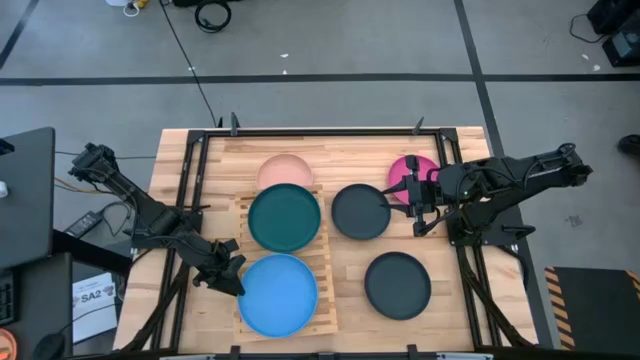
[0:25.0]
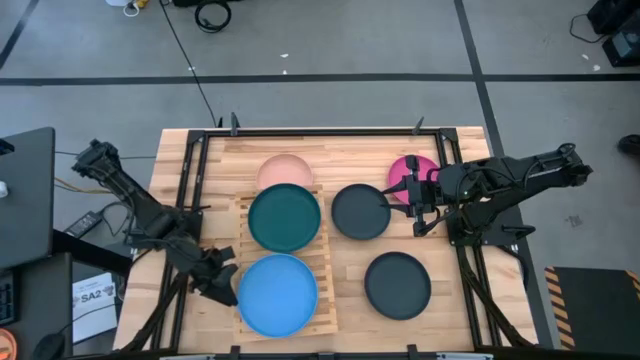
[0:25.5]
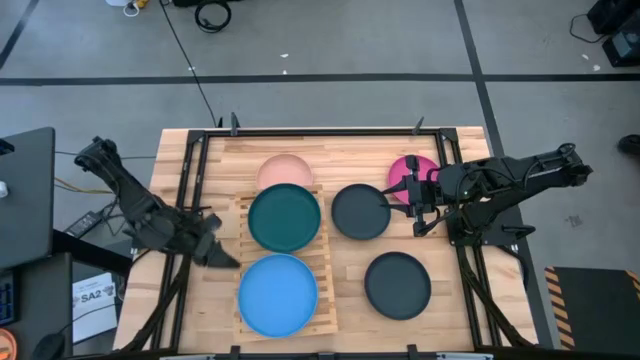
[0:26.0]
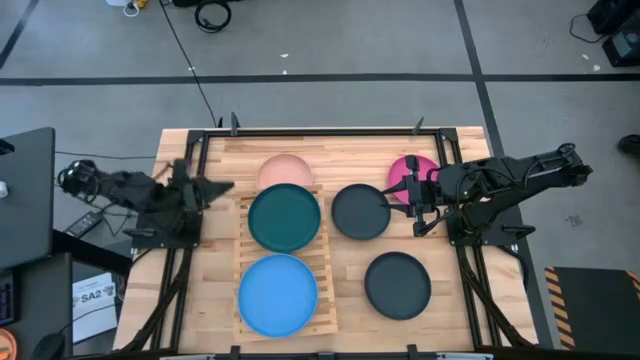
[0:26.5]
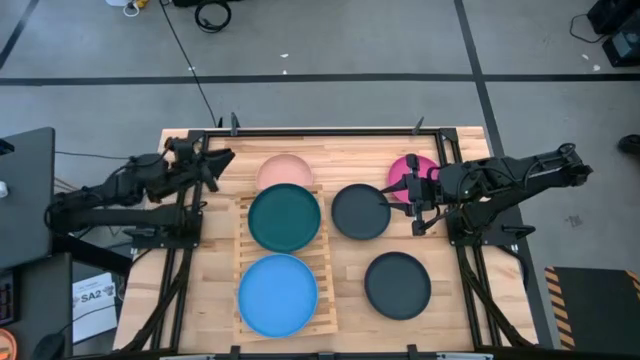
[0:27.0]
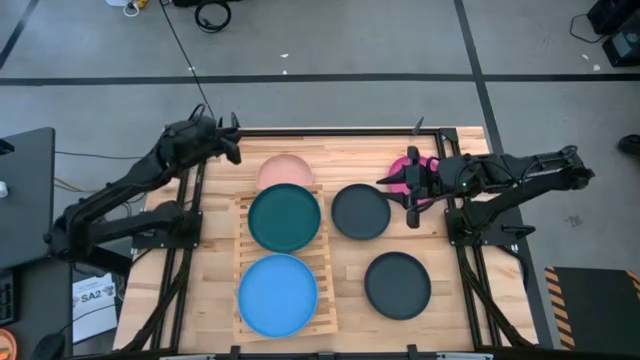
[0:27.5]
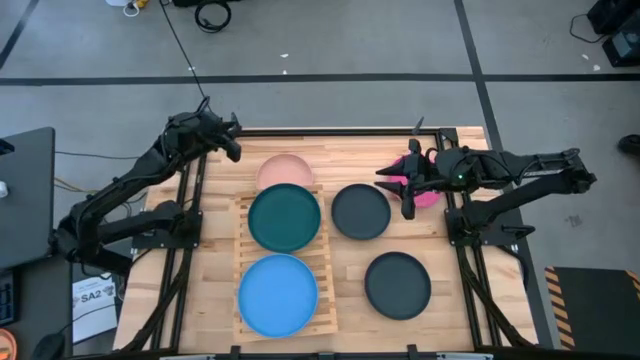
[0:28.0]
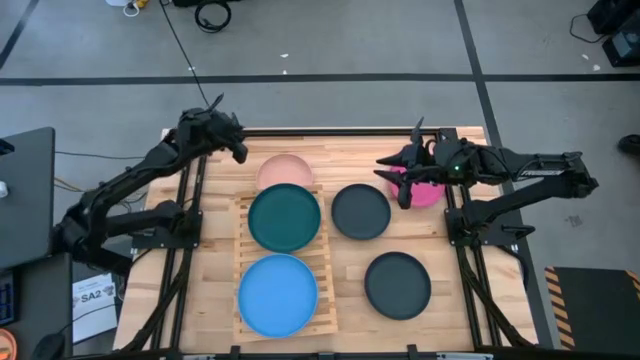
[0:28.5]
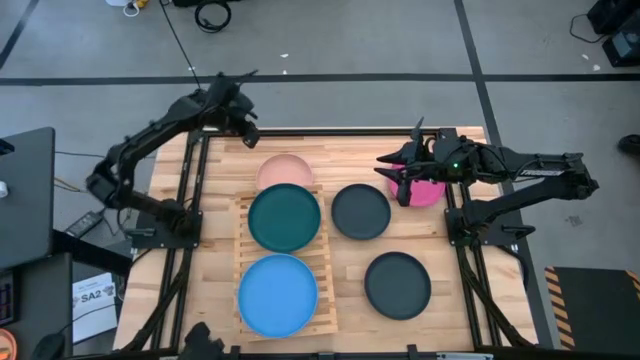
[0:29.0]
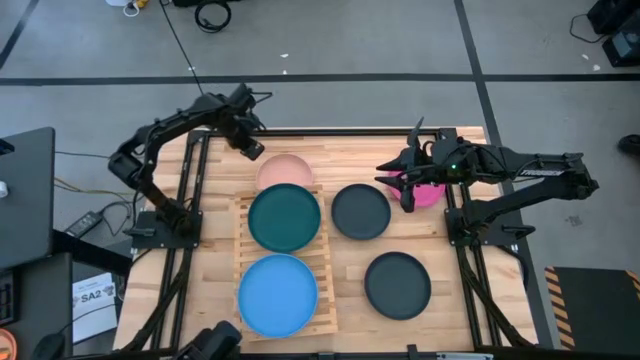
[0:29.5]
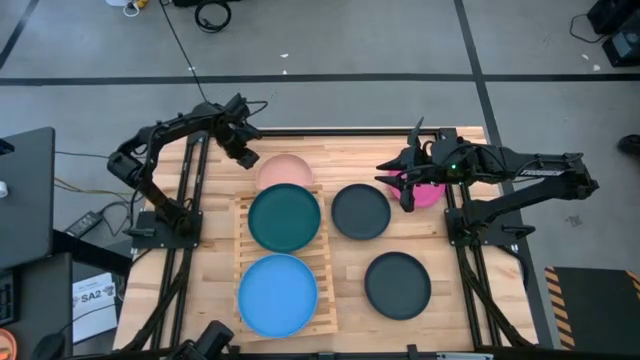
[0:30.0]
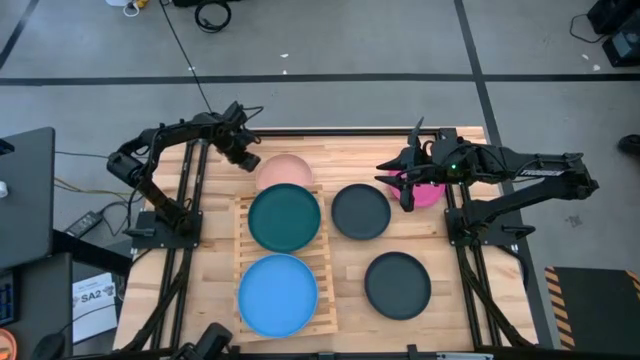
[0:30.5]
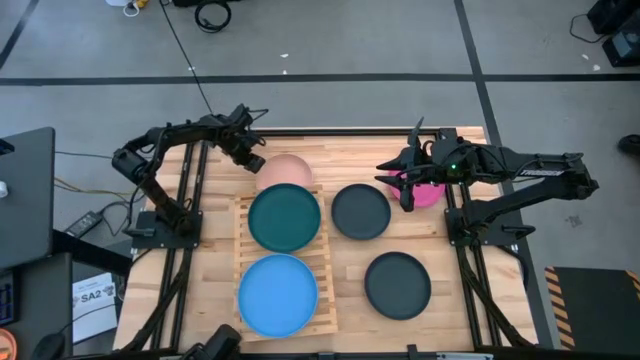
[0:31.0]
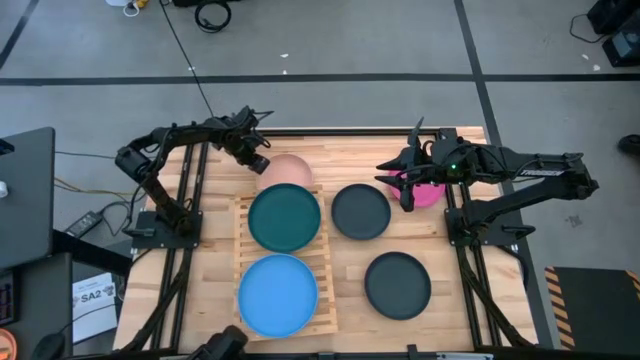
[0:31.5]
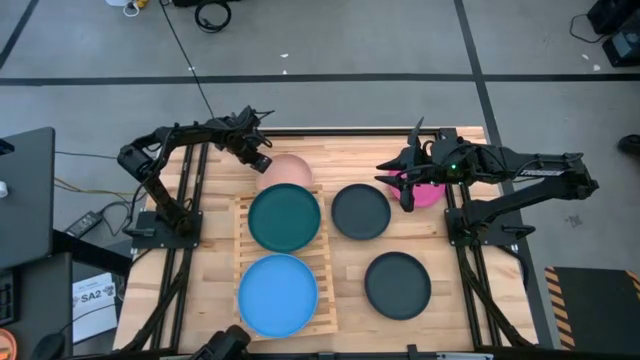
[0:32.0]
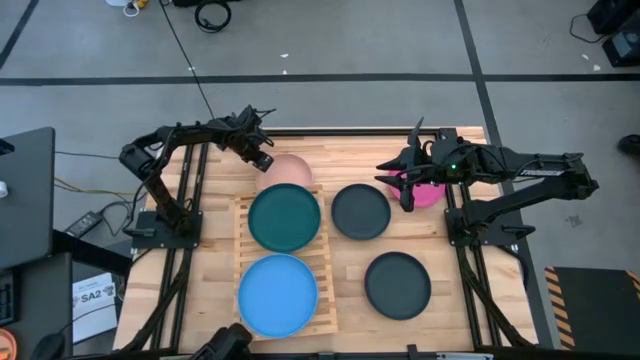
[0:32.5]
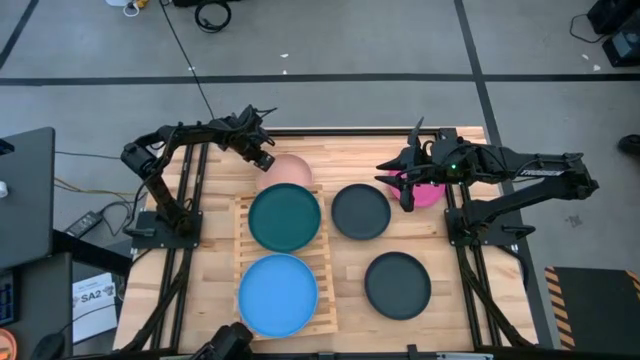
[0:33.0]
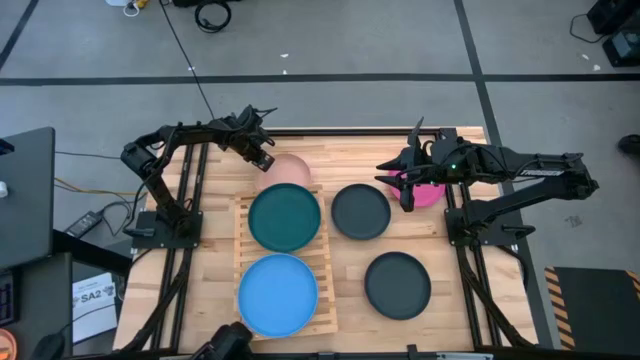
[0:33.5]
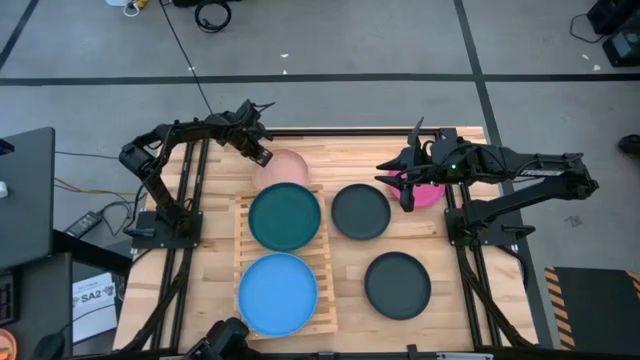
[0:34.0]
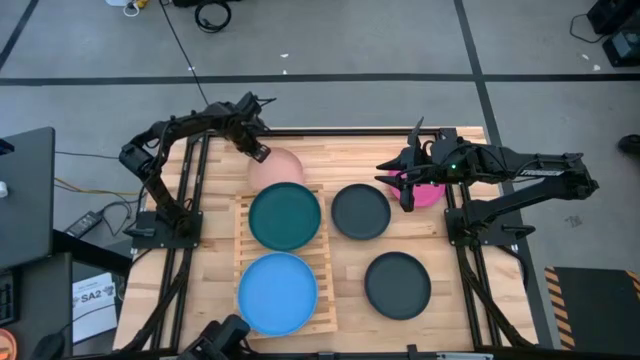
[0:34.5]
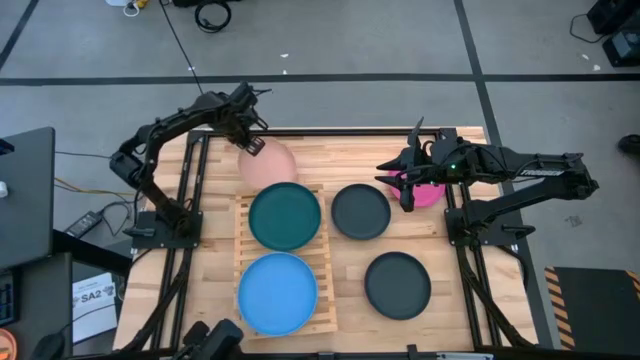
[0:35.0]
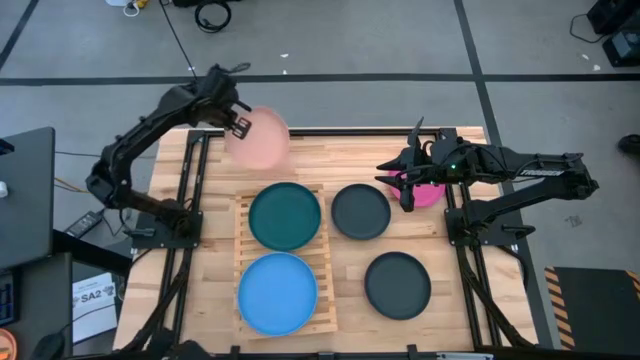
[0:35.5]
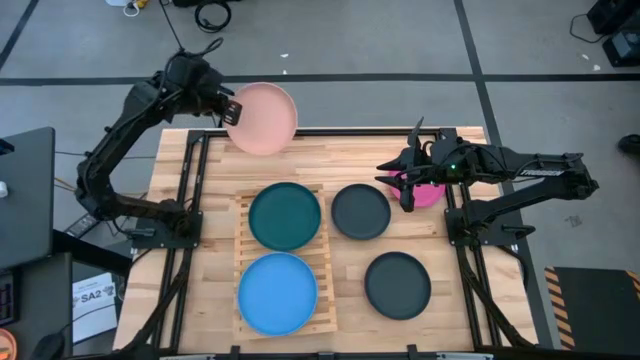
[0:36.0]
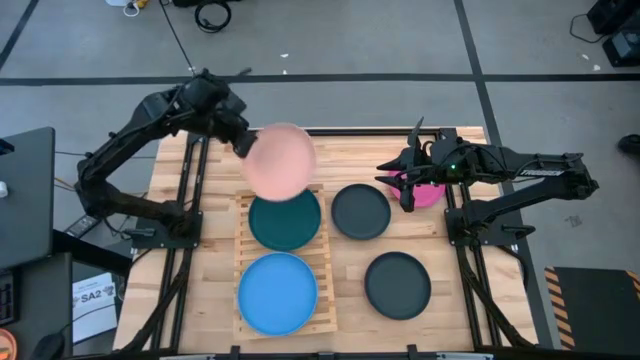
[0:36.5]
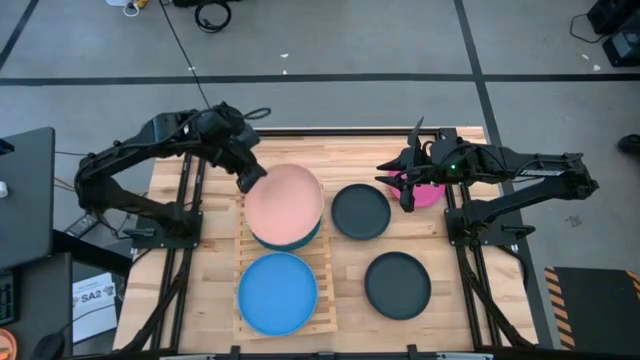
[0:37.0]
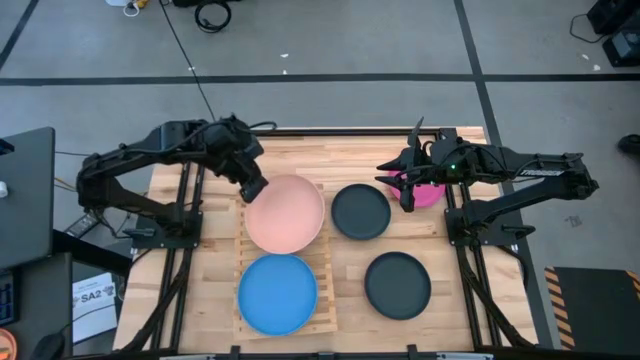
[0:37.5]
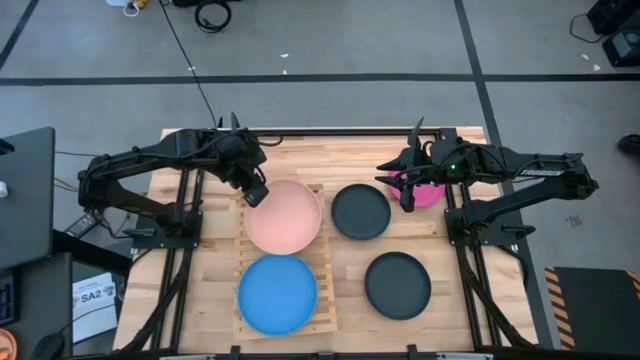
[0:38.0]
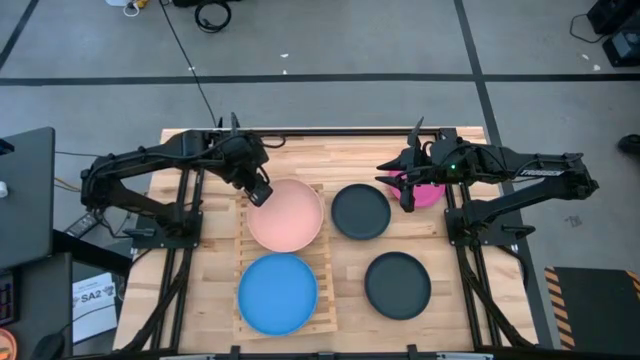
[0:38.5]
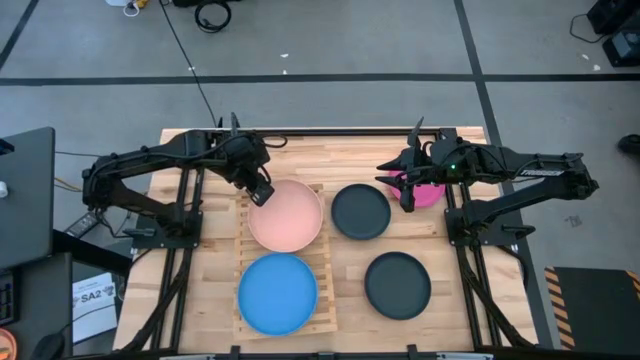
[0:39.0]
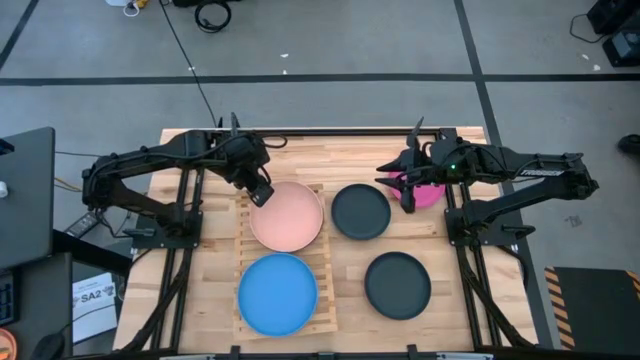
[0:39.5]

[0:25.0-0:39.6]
Task: Place and stack plates onto a shelf
Stack the top brown plate on top of the green plate on the shelf

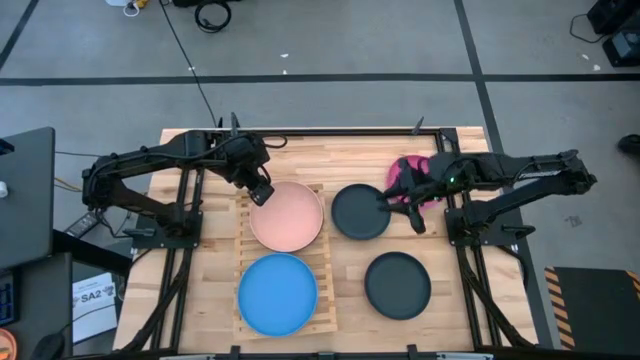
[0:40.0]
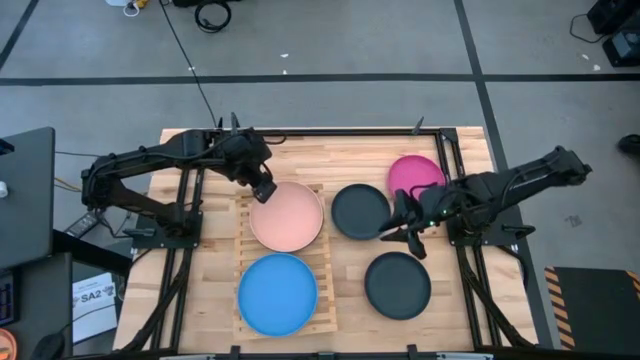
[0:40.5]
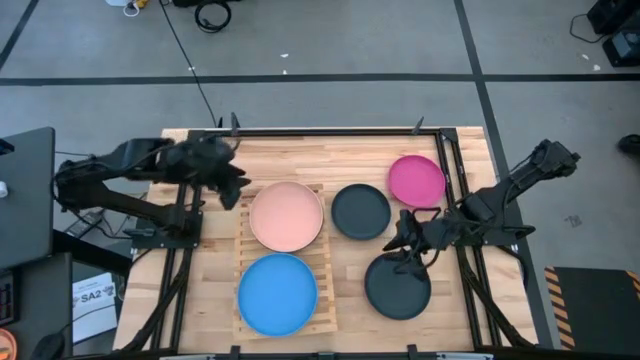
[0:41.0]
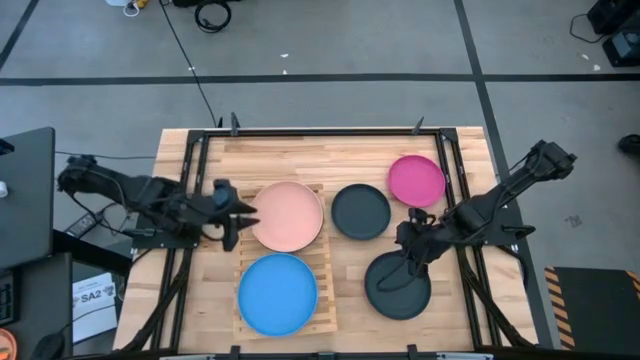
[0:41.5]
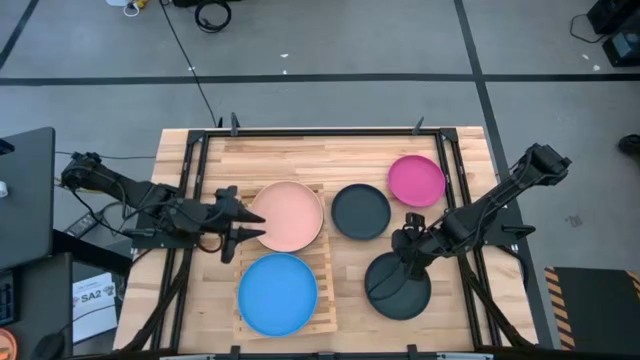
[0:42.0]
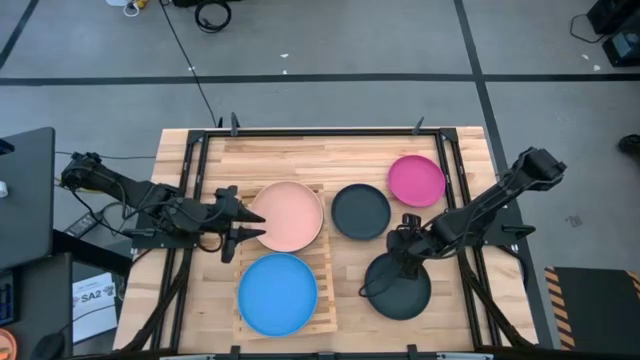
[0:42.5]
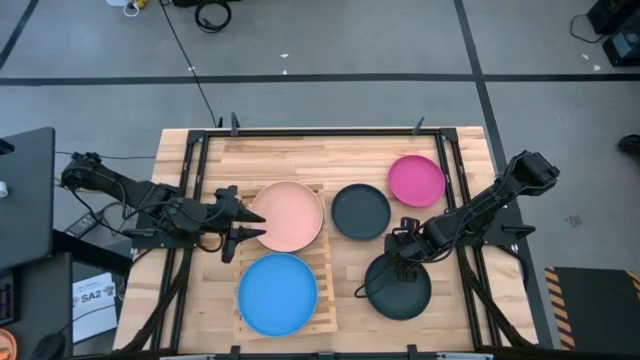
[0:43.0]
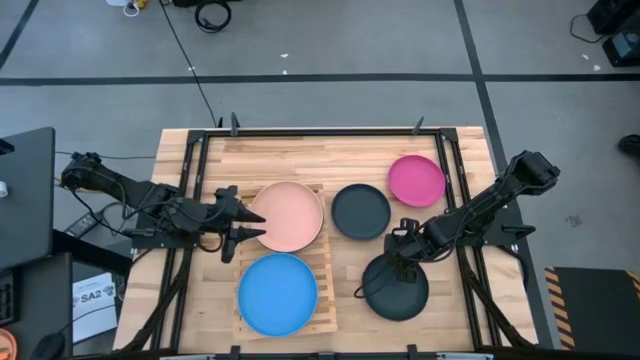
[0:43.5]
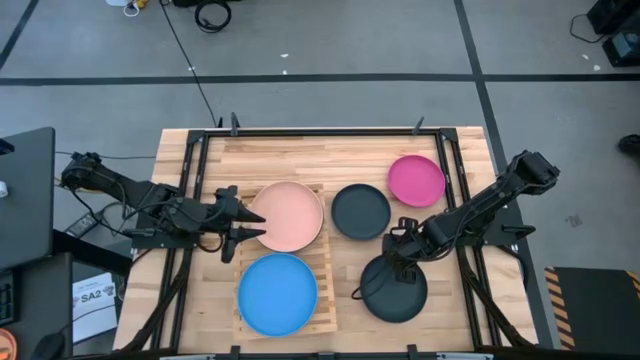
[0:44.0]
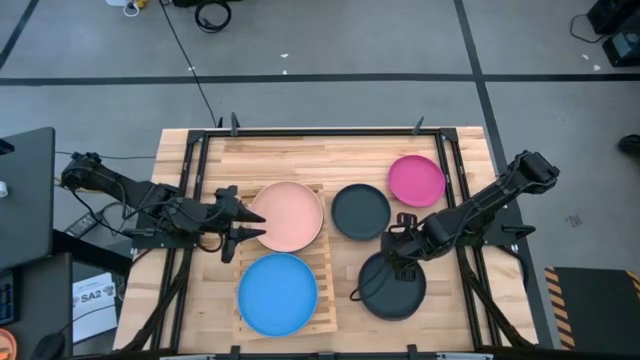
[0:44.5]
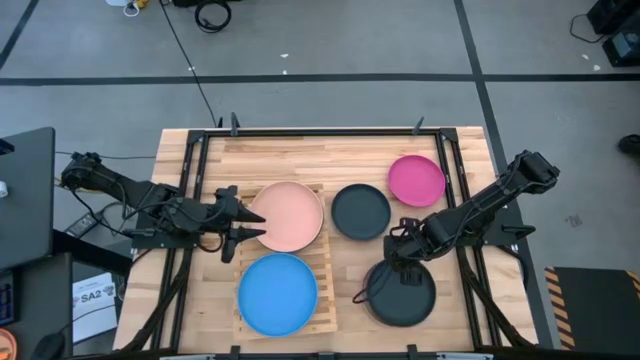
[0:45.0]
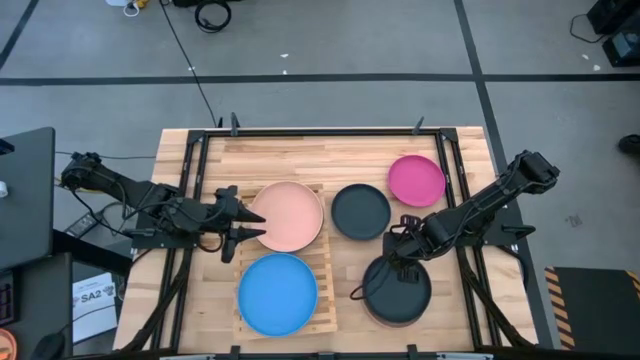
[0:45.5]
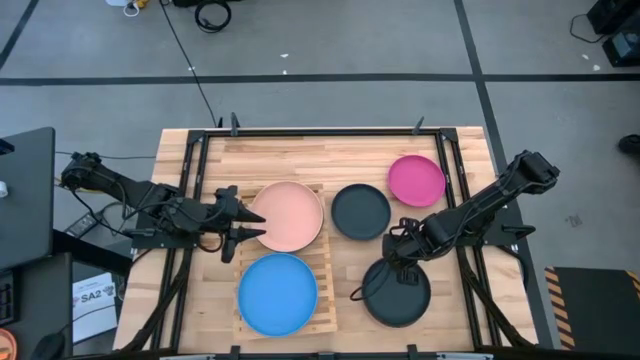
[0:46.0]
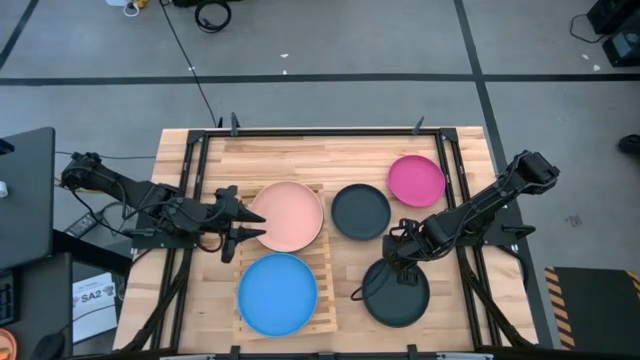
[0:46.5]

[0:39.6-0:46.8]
Stack the bottom black plate on top of the blue plate on the shelf
